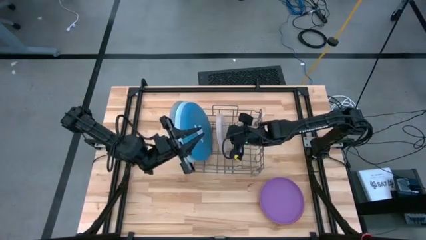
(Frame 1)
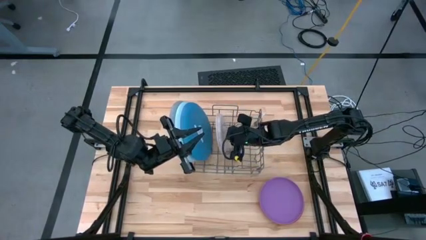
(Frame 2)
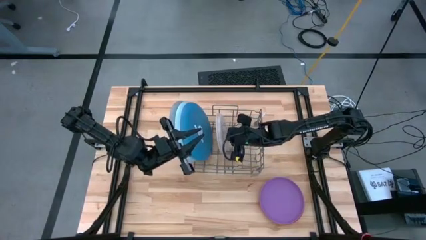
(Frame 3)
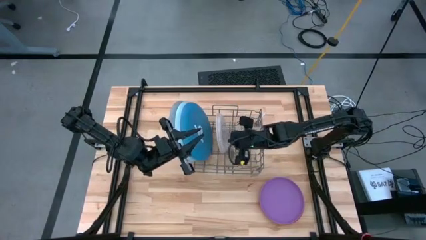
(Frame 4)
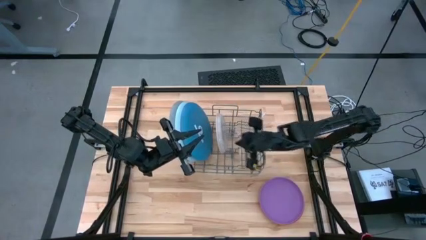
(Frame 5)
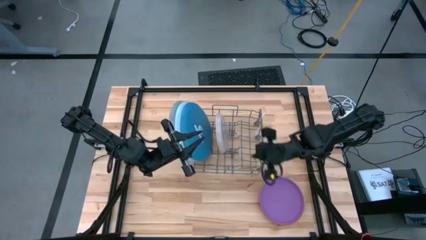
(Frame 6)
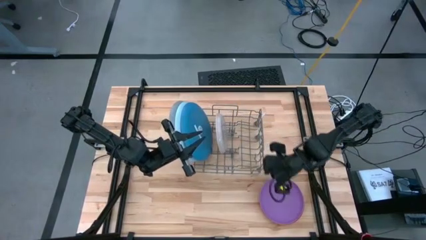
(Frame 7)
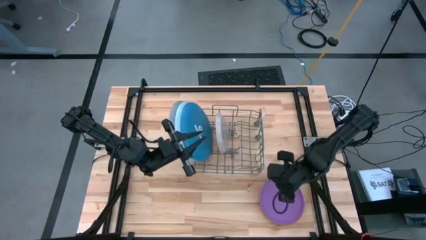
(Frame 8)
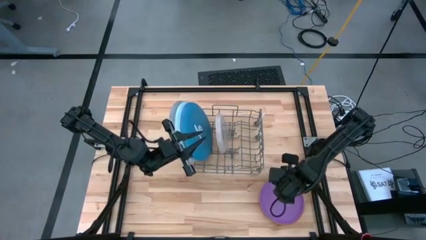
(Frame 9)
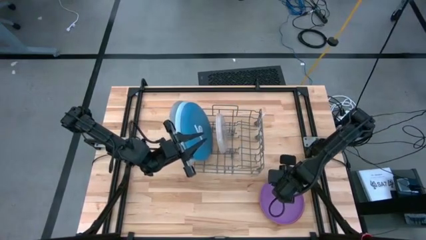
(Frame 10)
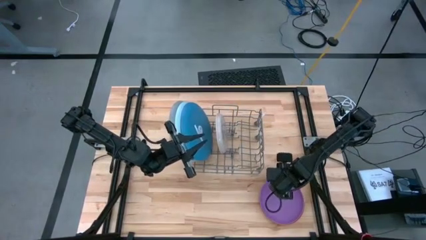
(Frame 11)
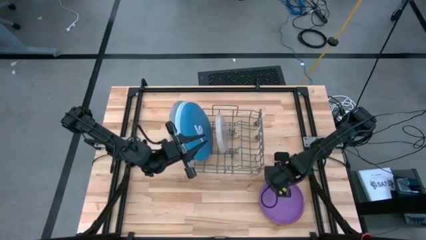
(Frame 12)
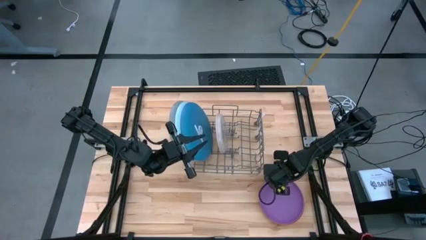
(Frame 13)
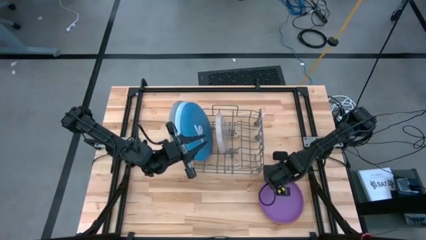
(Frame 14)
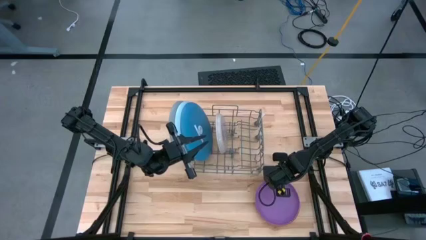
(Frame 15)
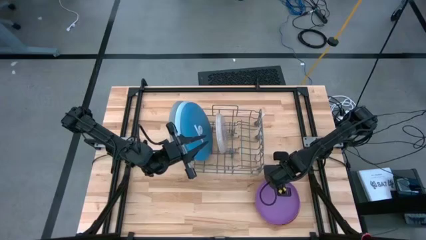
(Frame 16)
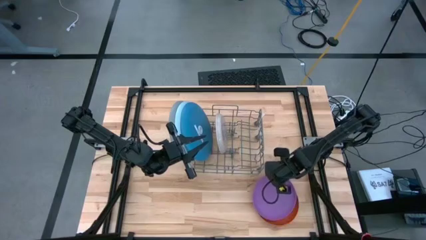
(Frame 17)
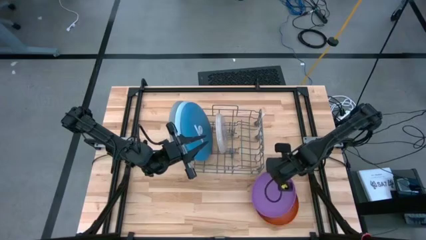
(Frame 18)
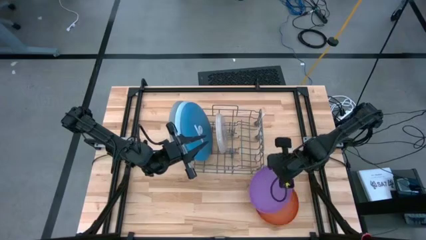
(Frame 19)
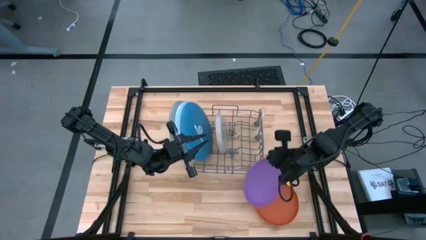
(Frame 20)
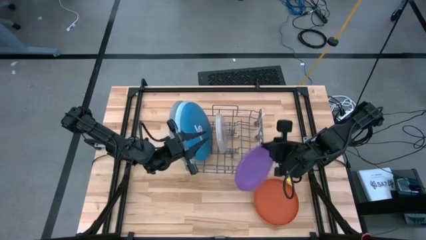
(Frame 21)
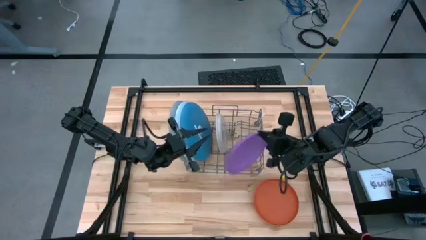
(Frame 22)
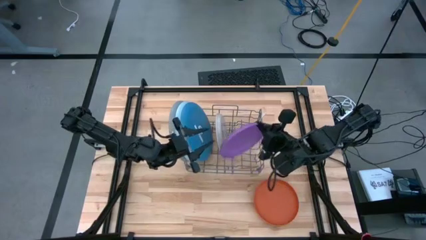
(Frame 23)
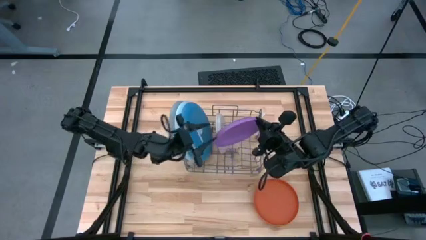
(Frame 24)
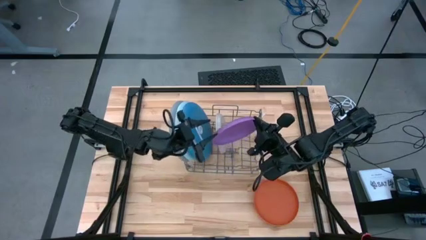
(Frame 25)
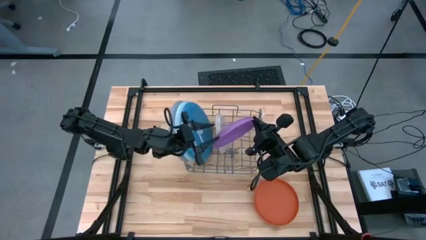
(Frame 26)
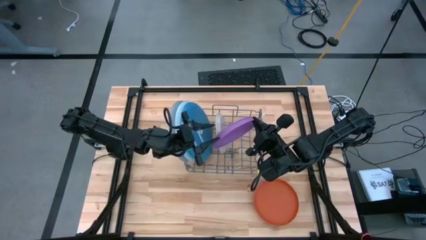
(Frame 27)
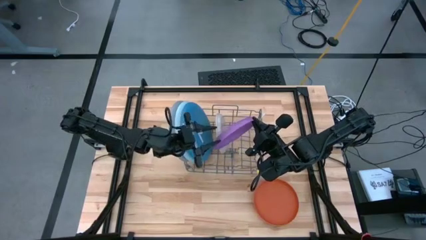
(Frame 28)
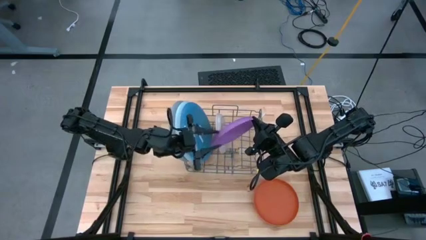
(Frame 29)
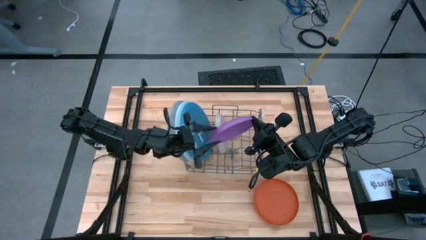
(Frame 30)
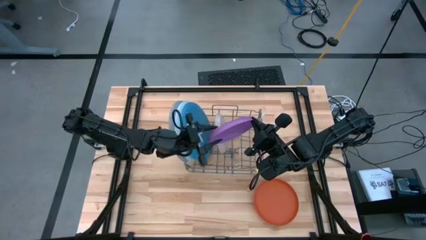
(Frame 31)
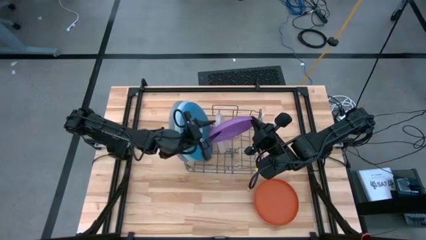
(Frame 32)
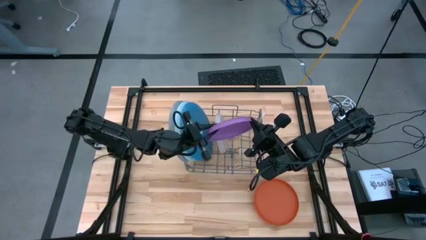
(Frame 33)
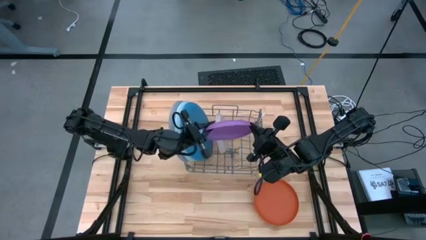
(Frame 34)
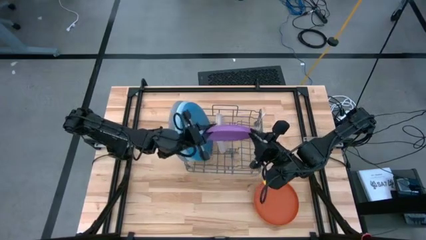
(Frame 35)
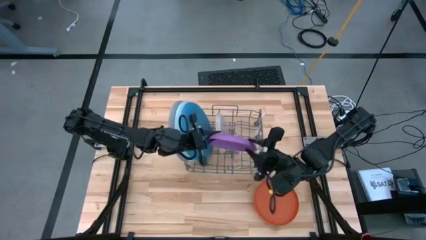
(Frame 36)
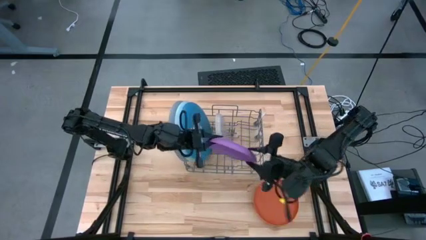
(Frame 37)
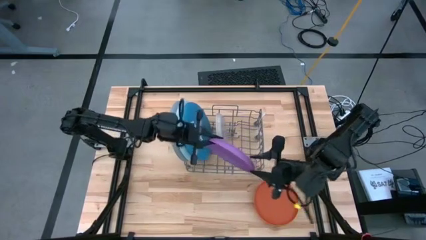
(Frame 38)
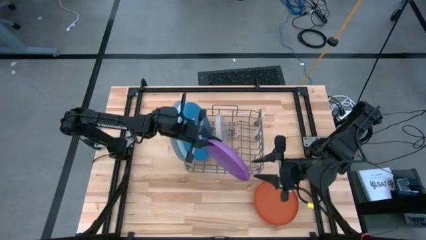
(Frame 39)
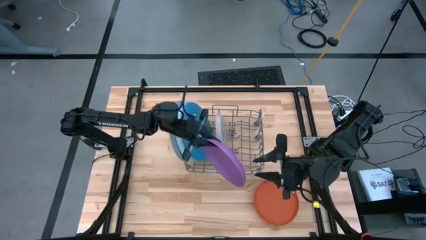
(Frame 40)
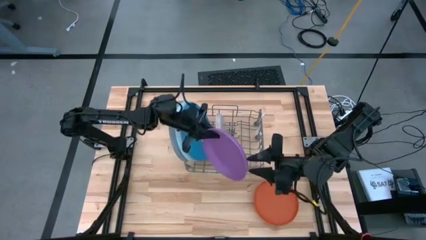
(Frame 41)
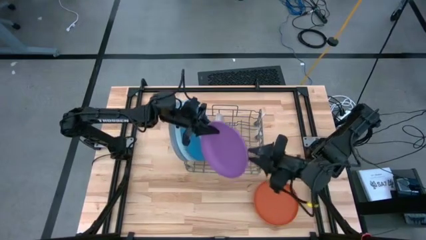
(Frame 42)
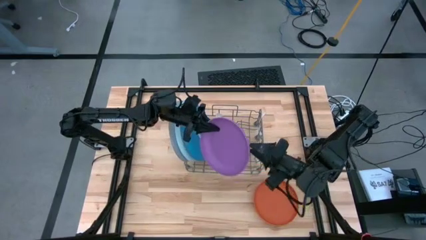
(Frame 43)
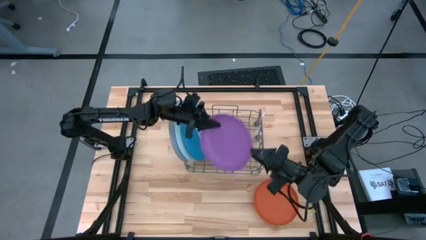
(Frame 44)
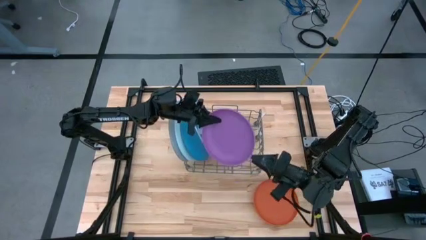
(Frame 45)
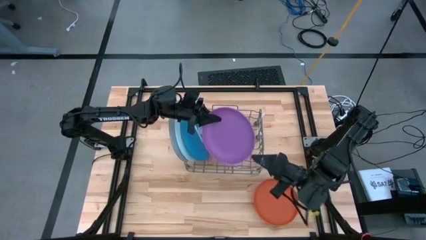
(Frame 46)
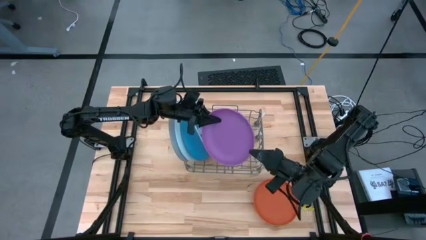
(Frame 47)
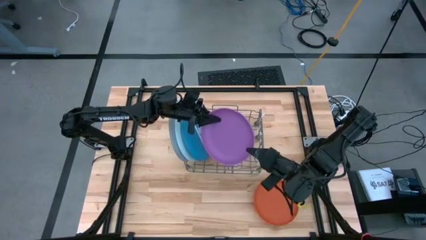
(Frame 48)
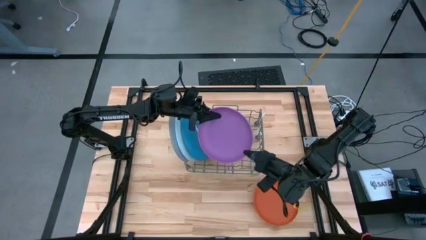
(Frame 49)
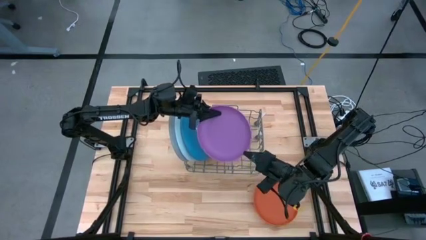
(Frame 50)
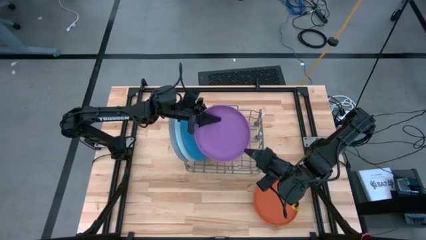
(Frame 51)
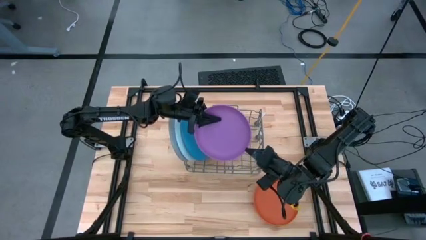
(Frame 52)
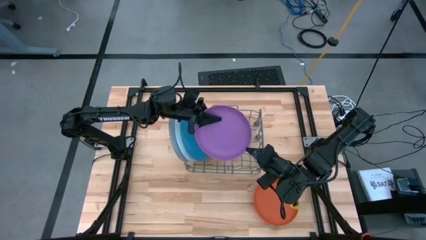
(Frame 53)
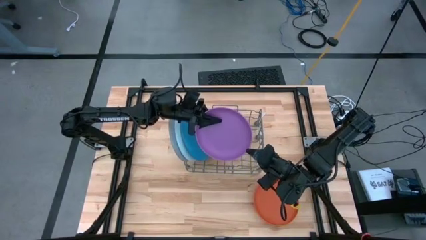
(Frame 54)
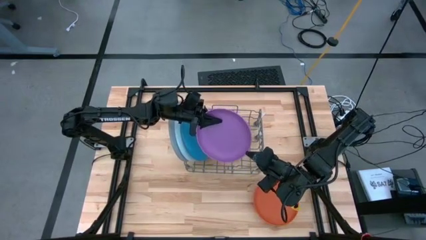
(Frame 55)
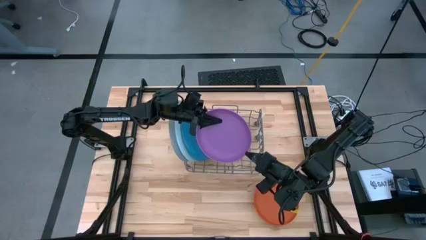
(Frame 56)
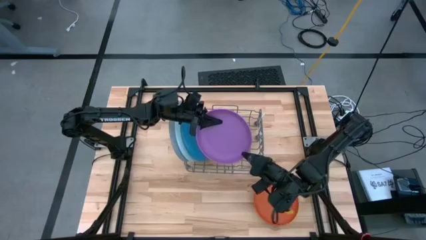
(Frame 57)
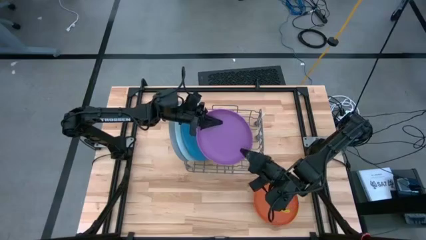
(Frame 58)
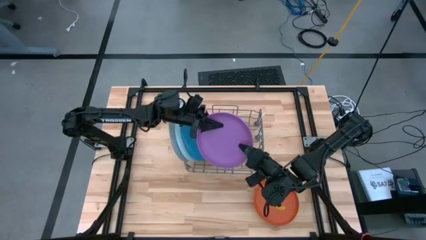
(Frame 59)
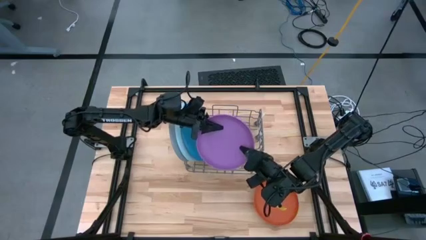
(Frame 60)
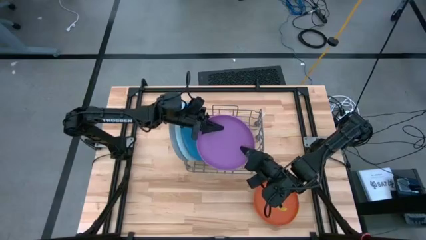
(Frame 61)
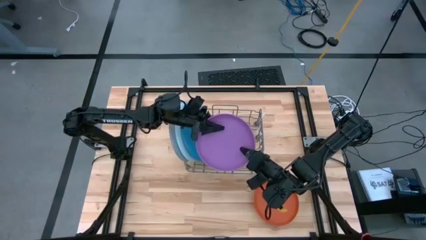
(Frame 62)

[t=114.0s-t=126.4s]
Task: Sort dishes
Put the violet plate into the dish rack
